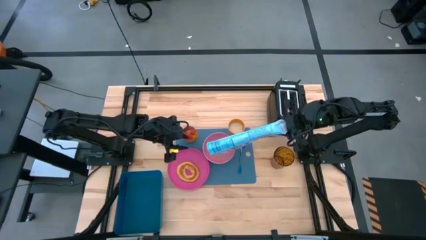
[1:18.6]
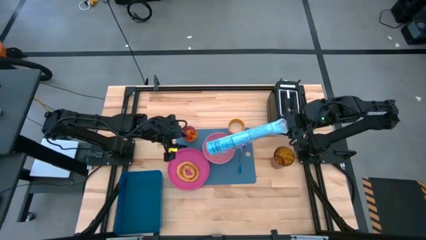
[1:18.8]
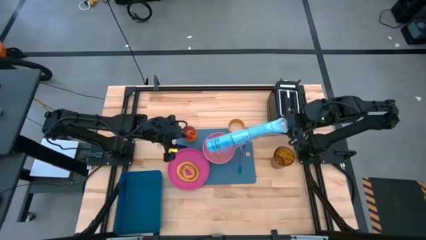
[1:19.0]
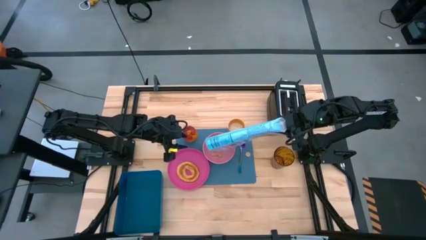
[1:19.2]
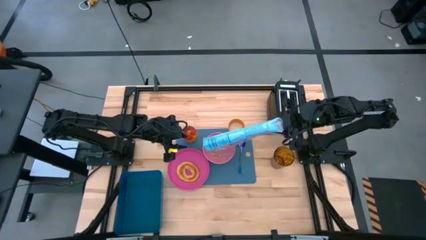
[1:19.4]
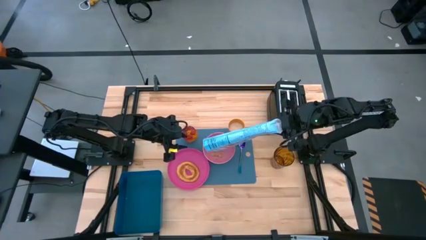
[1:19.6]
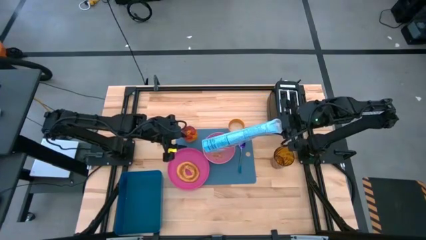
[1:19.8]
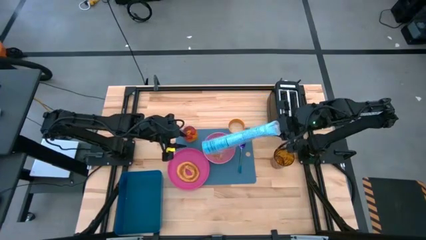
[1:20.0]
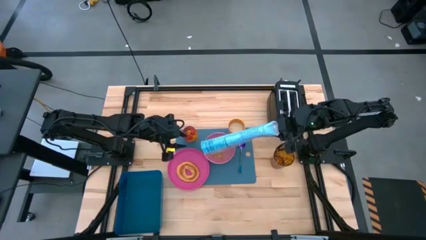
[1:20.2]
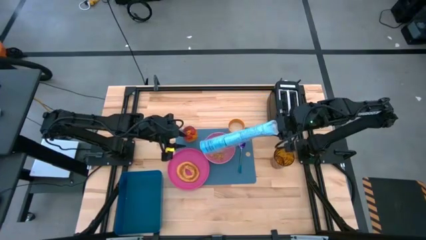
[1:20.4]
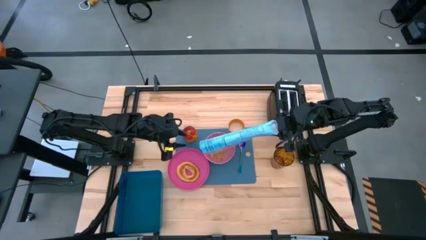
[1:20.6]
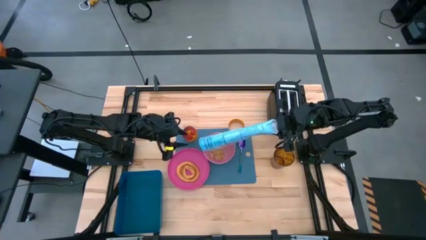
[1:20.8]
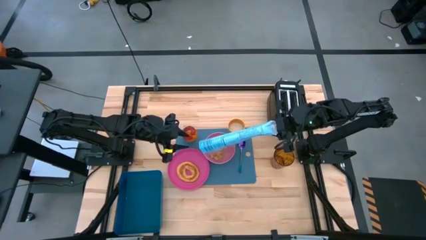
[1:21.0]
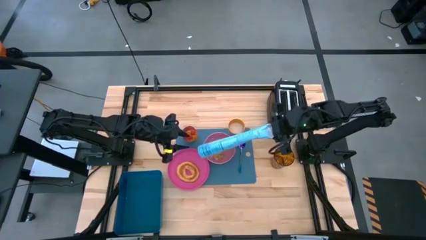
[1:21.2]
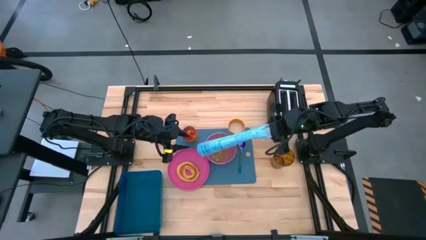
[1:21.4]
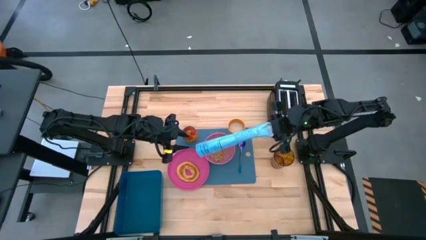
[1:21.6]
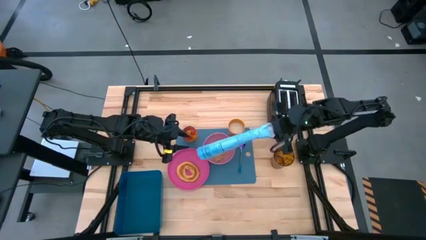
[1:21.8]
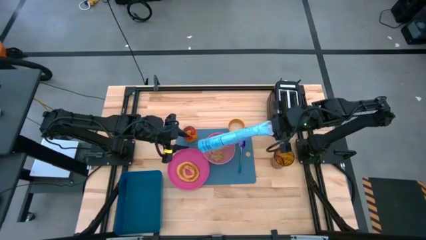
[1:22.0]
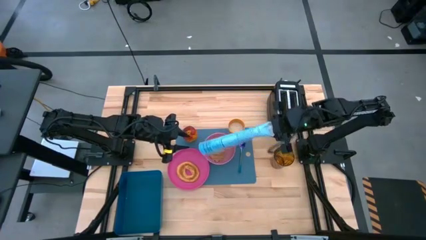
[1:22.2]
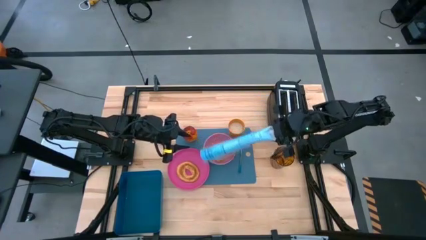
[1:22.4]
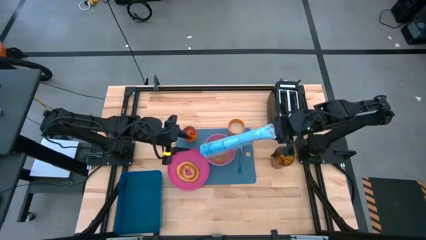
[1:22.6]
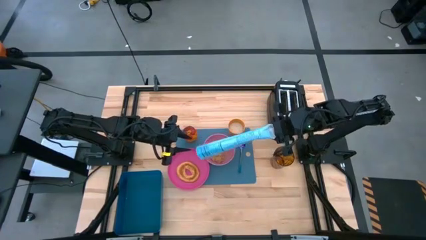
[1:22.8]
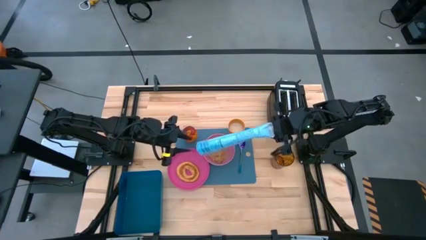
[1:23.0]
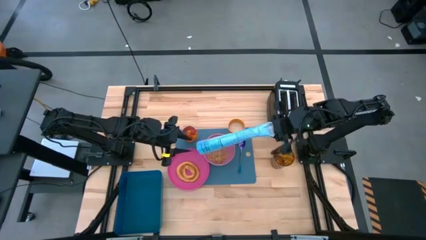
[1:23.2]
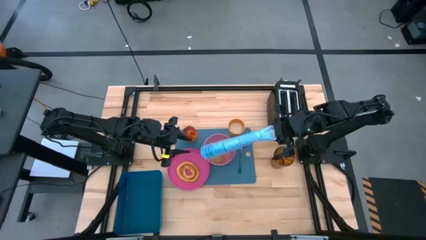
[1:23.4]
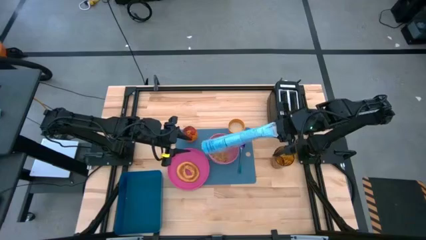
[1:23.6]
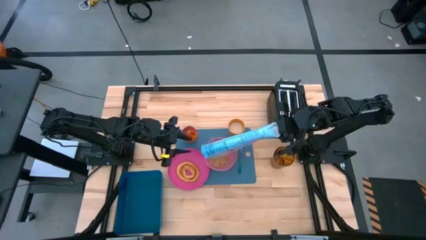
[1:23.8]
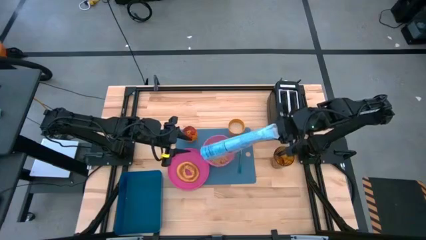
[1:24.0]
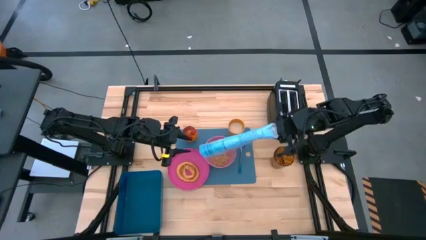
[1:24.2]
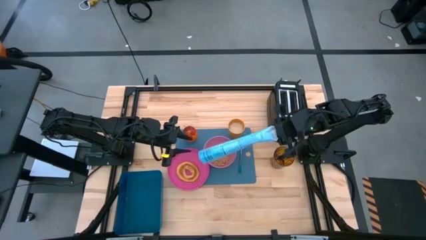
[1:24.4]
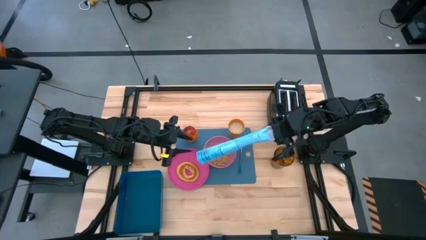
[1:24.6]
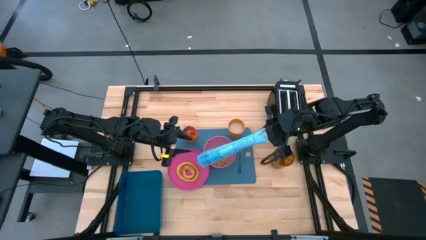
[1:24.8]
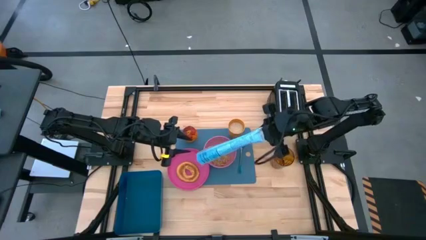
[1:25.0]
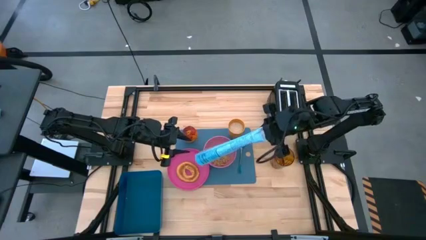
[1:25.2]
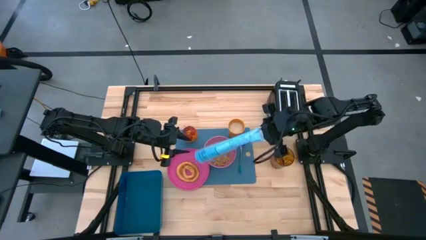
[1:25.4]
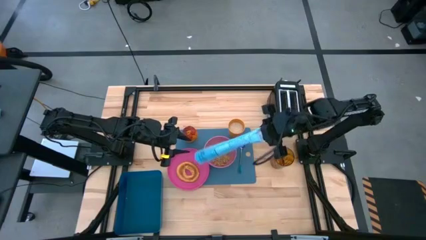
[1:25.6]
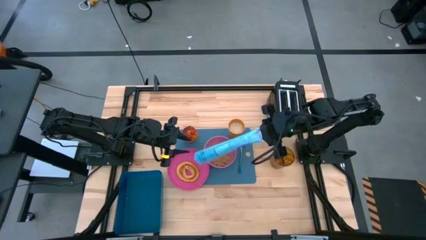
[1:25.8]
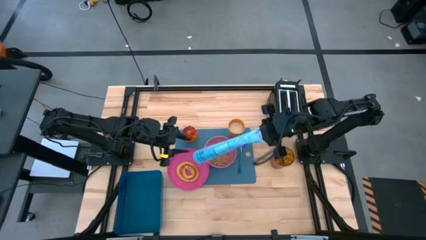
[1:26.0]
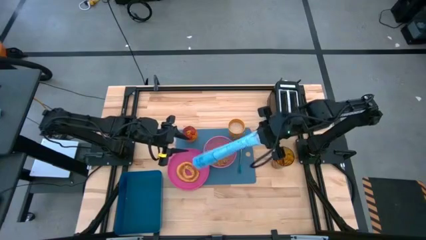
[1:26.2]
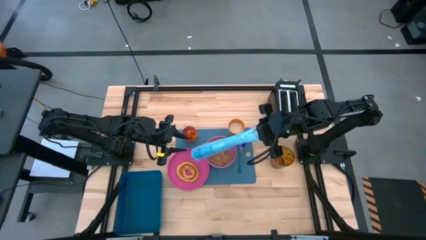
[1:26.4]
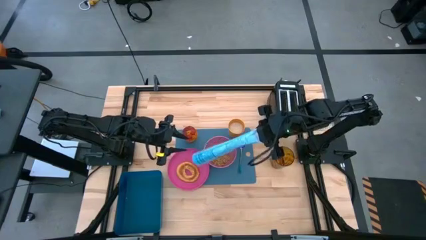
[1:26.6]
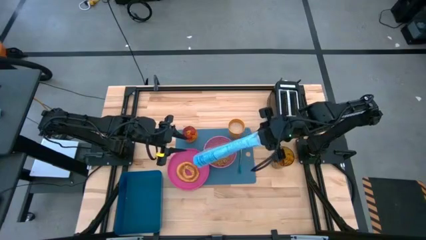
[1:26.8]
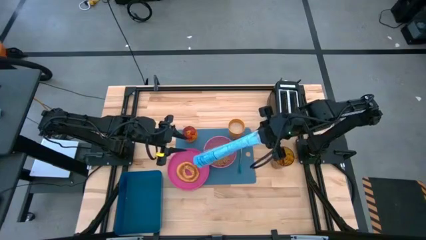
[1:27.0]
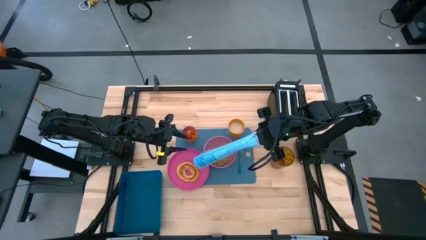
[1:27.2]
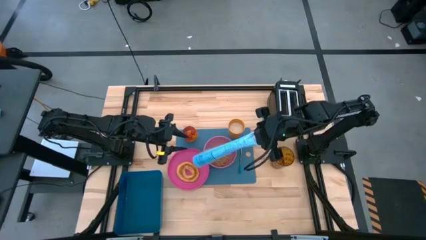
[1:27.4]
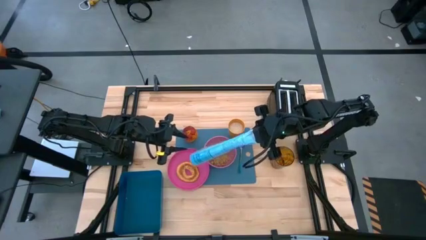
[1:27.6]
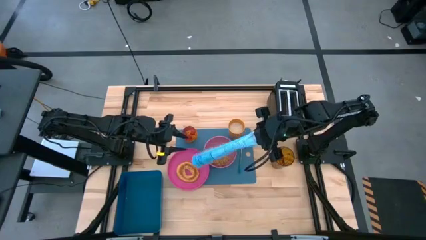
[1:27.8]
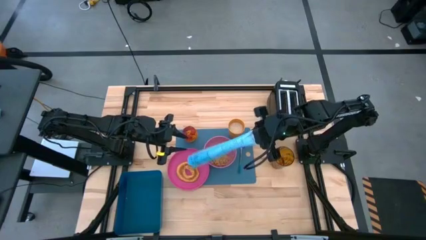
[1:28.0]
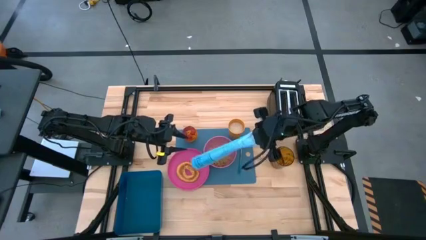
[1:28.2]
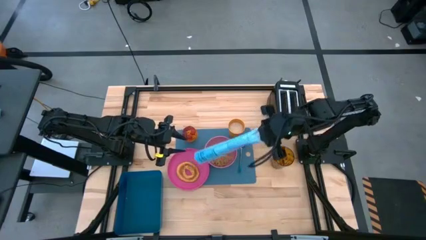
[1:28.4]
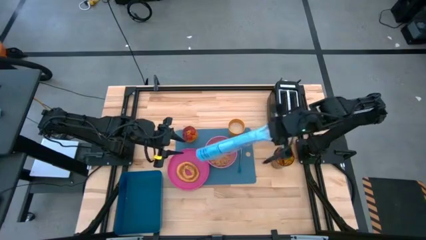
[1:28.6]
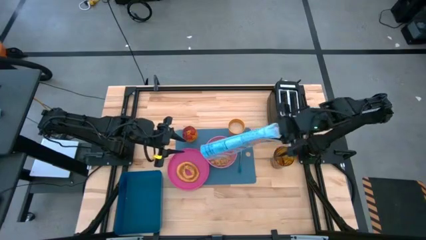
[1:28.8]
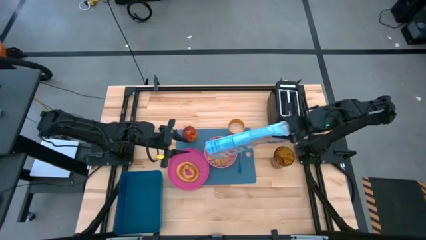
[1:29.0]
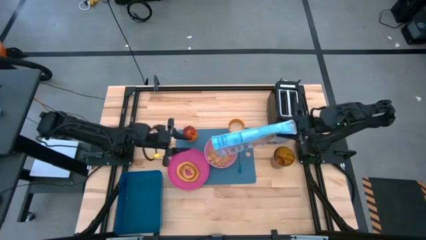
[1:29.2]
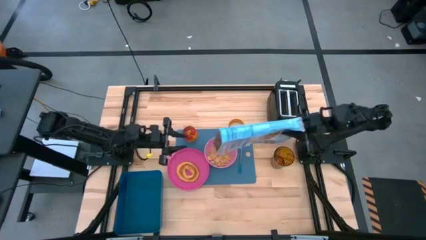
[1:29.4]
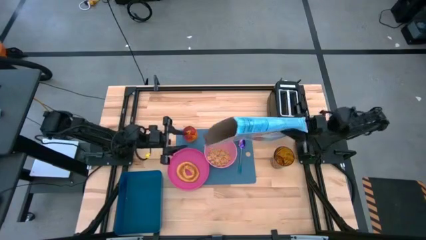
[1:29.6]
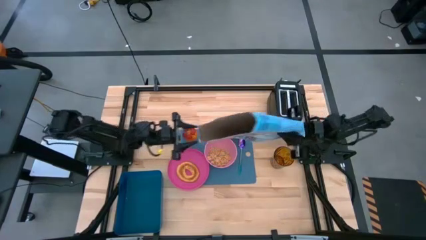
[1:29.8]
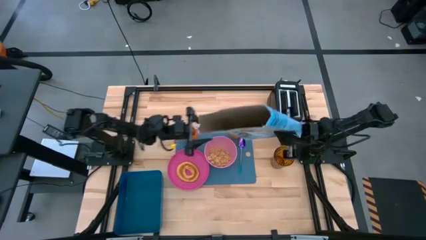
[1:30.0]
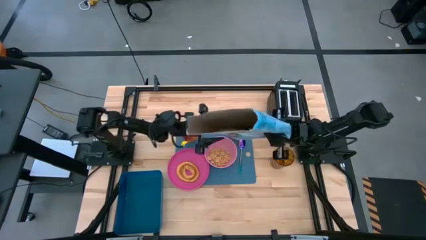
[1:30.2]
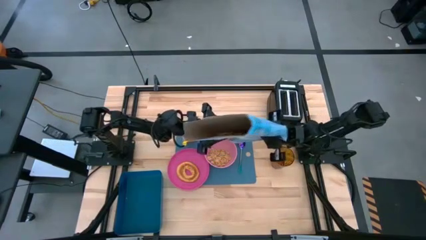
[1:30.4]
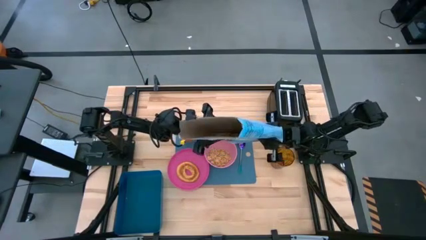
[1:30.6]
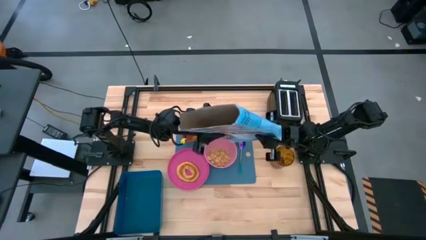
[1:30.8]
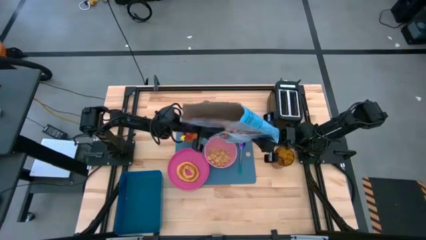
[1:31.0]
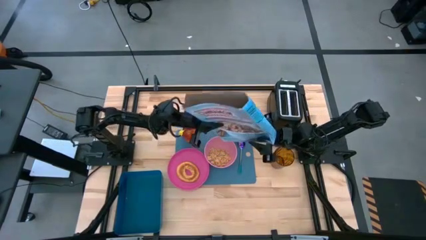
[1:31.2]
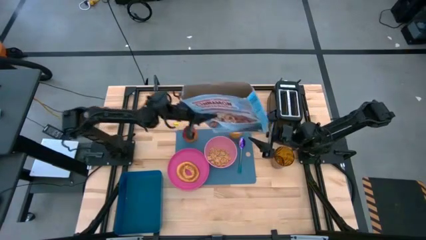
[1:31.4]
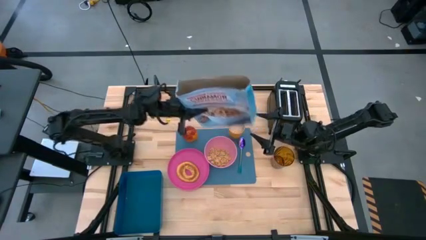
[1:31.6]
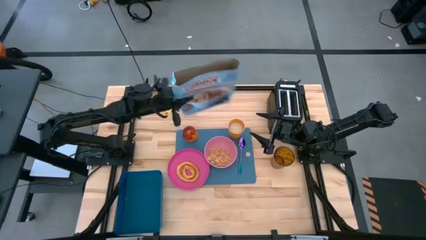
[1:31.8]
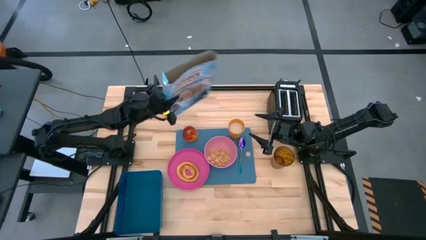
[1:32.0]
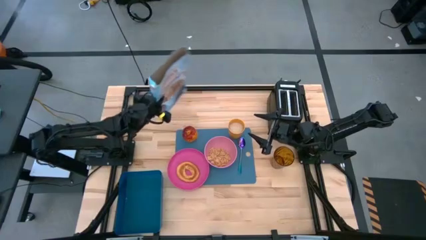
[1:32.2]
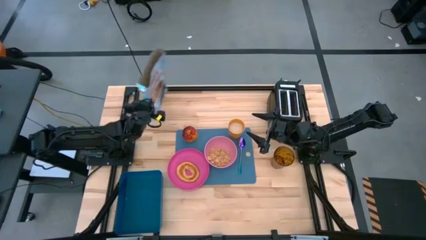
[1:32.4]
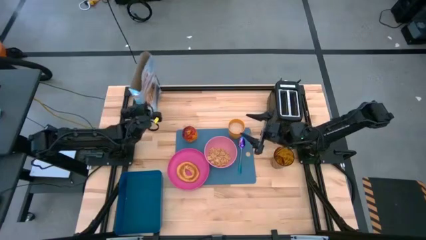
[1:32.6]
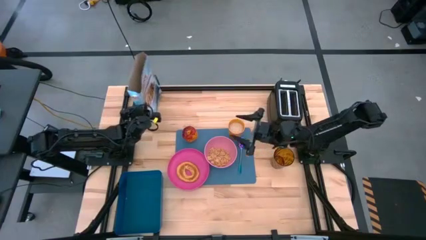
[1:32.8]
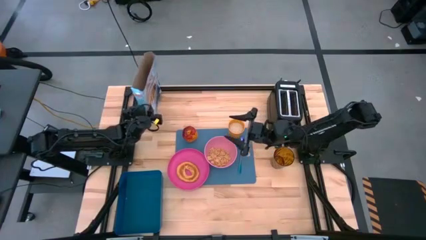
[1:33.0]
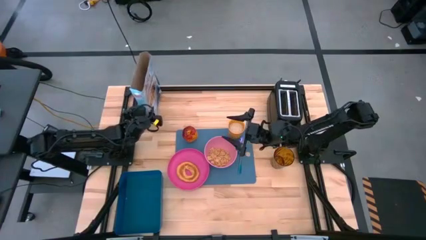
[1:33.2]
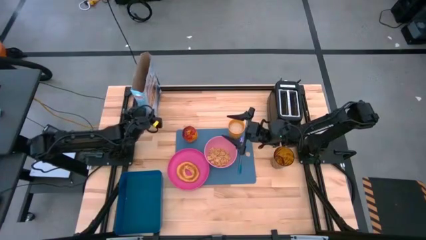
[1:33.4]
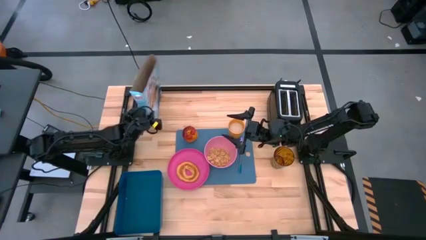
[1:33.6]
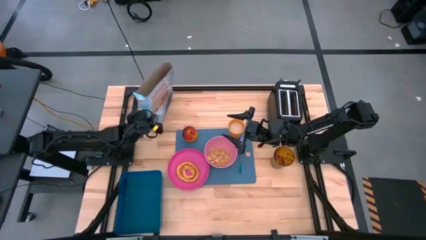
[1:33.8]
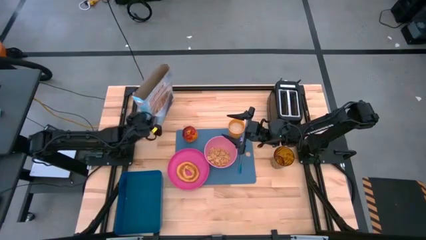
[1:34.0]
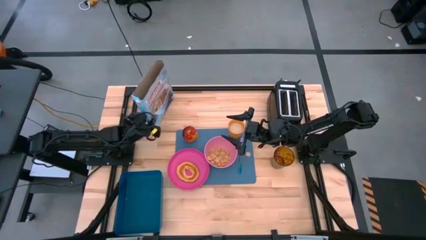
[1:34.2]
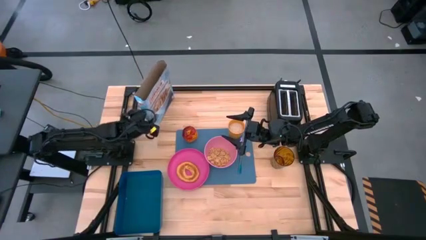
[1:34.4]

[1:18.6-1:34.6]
Task: Arrange a breakfast setting
Pour the cereal from the blue cereal box into the pink bowl
